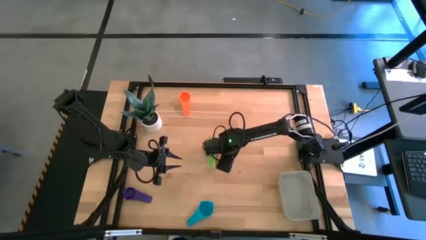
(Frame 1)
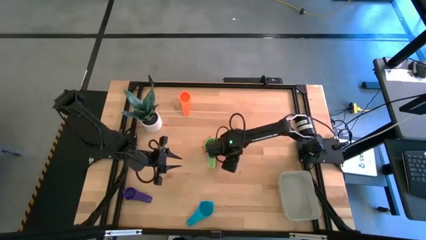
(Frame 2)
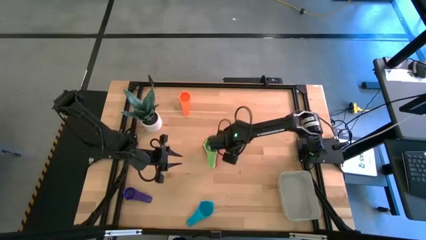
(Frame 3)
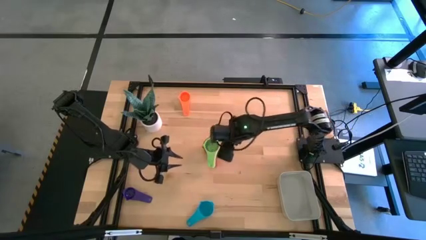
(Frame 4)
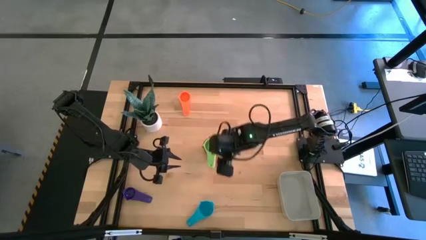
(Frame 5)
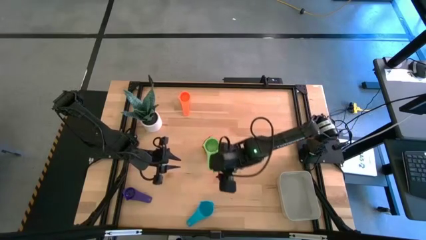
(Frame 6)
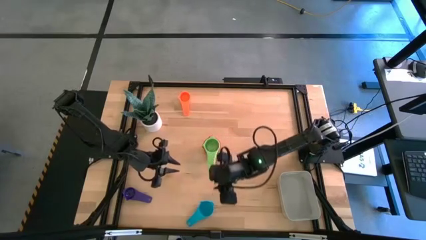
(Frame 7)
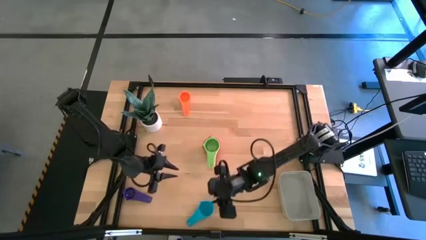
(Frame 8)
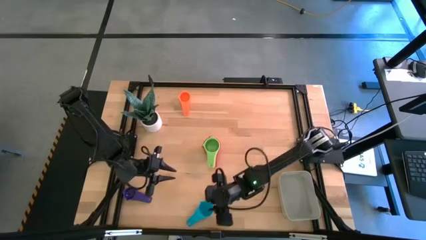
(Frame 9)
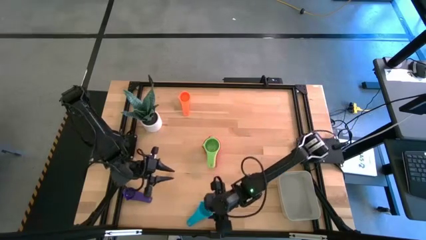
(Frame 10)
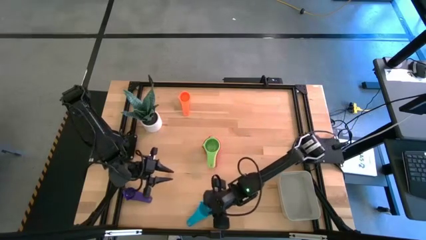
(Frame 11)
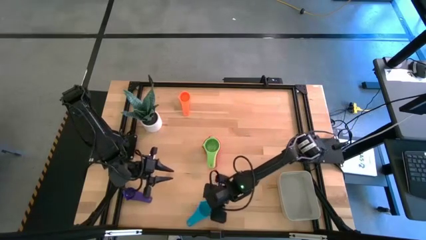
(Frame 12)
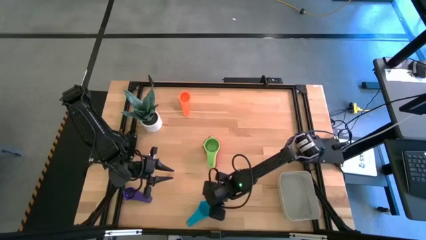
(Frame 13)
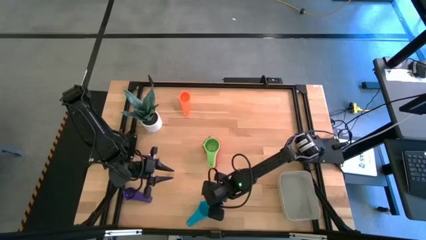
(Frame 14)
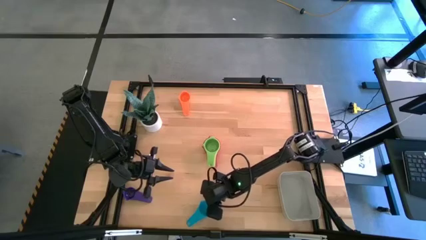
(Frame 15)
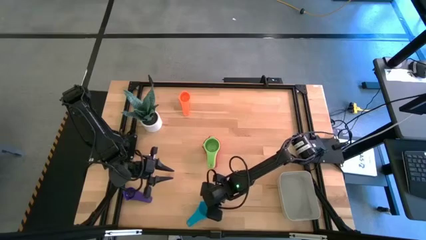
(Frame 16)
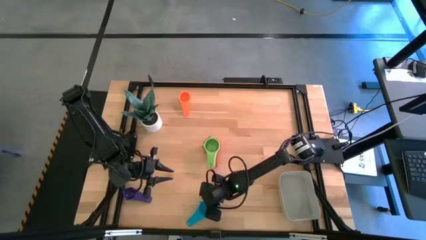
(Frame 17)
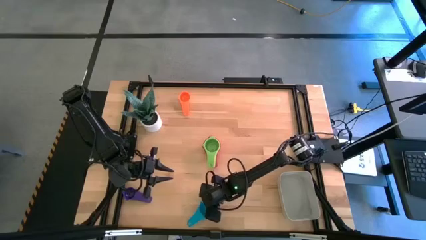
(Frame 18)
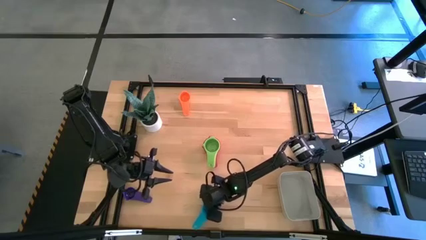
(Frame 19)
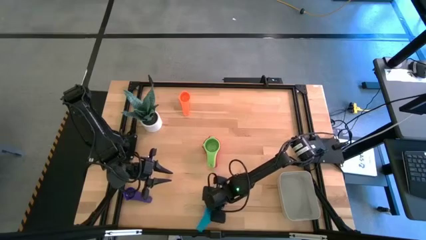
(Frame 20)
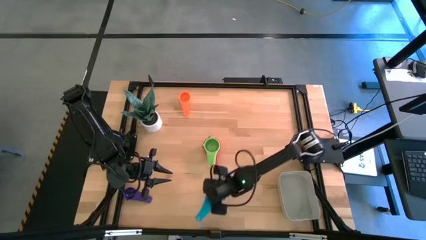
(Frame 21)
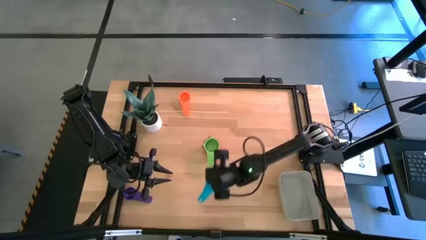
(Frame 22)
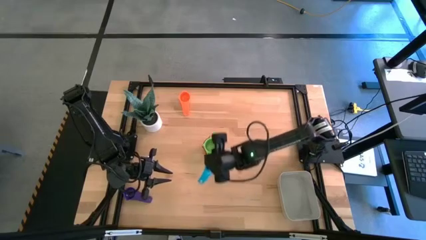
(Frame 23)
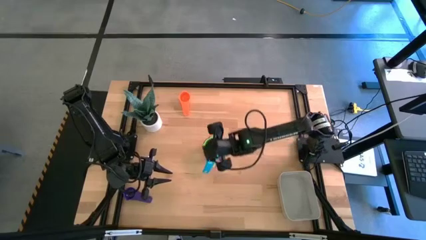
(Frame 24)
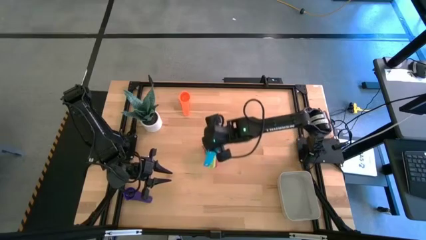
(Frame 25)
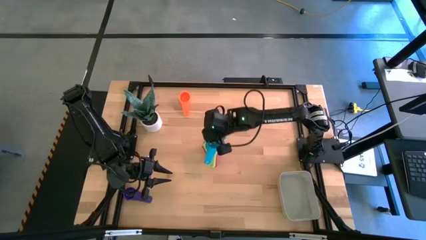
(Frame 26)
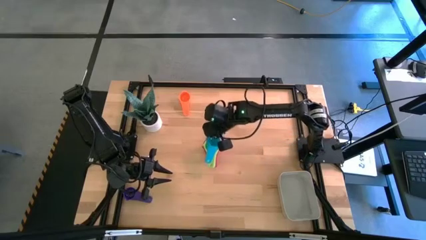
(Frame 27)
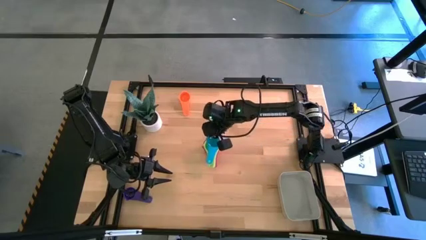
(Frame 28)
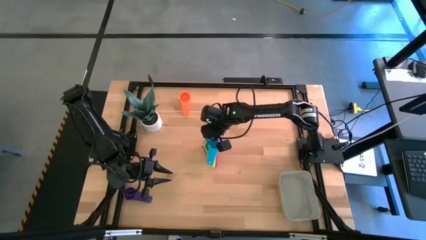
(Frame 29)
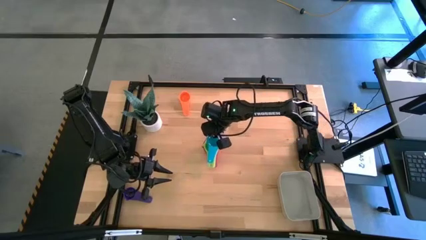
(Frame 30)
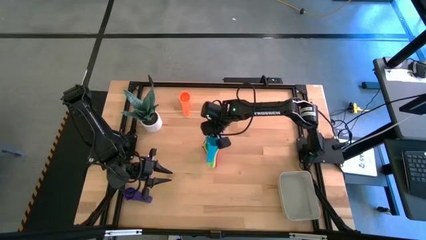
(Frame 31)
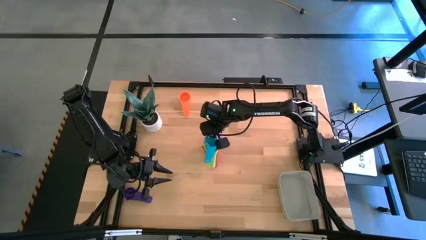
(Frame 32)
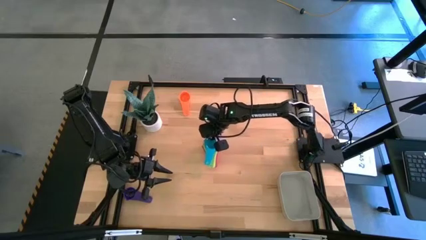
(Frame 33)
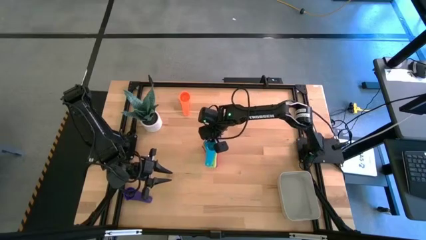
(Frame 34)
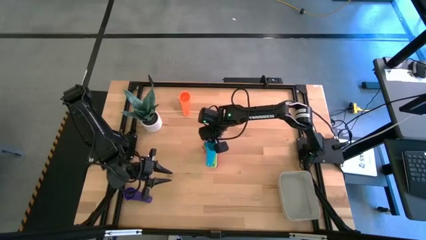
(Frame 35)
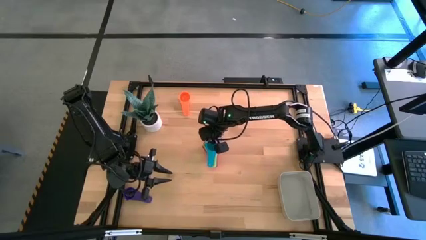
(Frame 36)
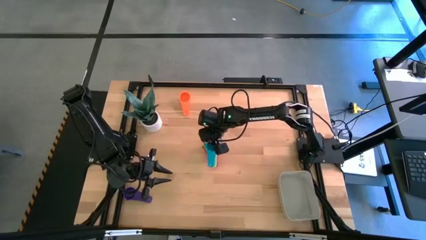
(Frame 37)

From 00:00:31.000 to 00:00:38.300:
Task: Nest measuring cups in basket
Stack the light blue measuring cup on top of the green measuring cup

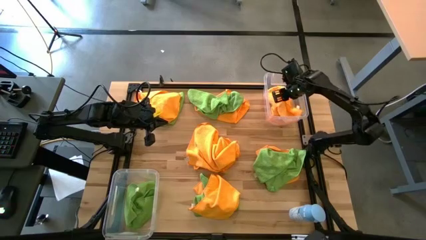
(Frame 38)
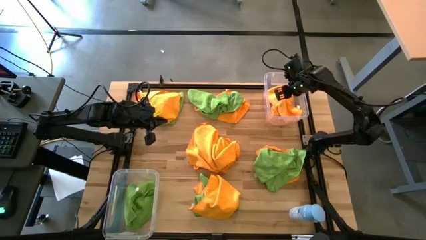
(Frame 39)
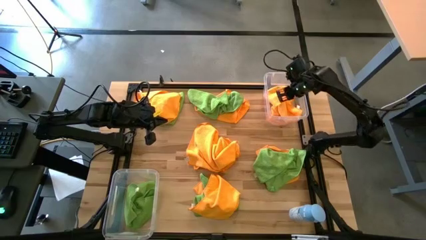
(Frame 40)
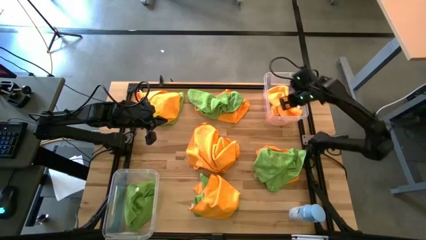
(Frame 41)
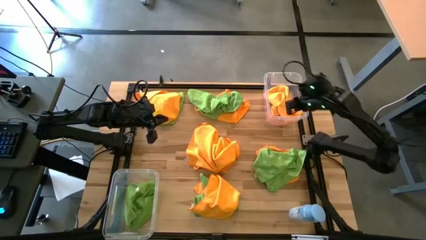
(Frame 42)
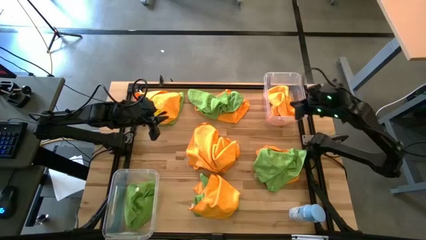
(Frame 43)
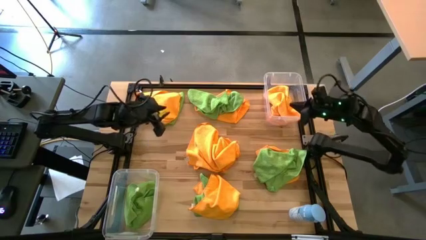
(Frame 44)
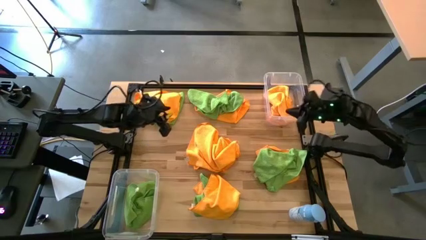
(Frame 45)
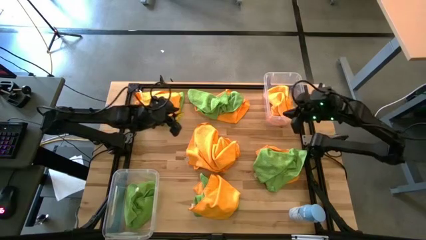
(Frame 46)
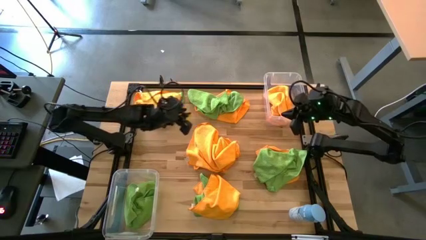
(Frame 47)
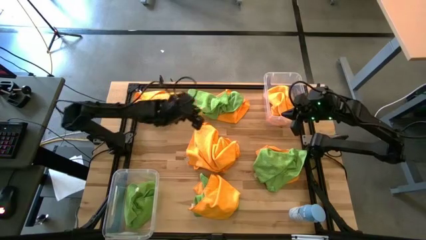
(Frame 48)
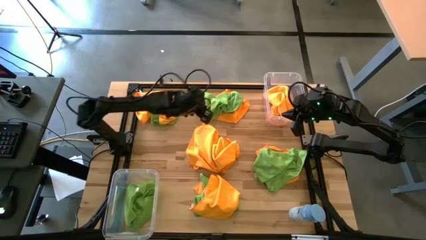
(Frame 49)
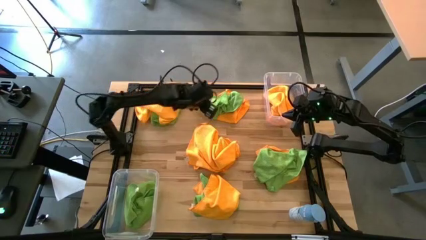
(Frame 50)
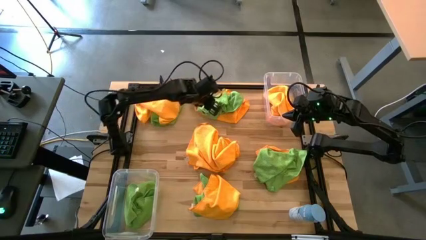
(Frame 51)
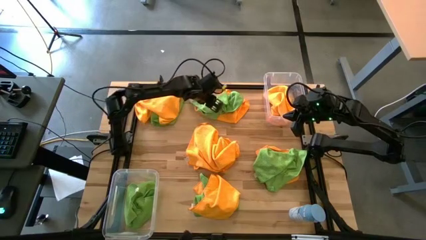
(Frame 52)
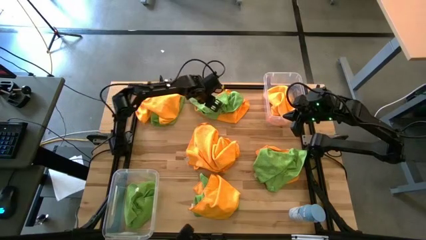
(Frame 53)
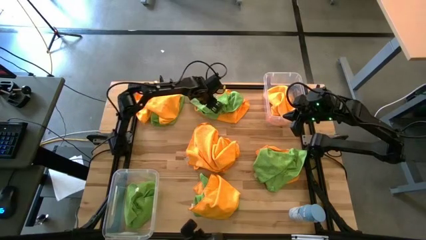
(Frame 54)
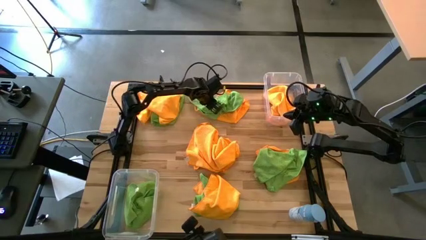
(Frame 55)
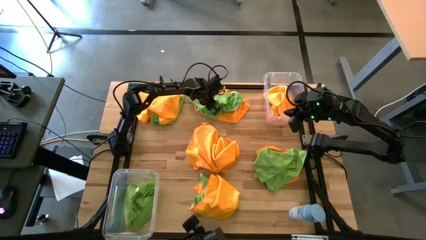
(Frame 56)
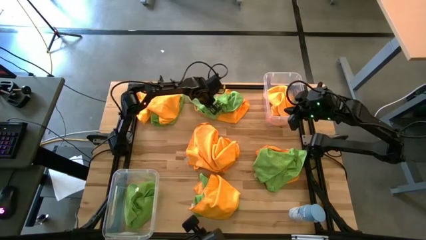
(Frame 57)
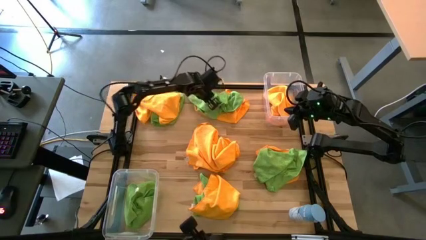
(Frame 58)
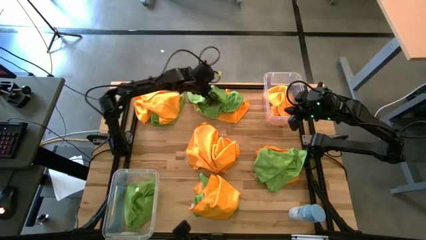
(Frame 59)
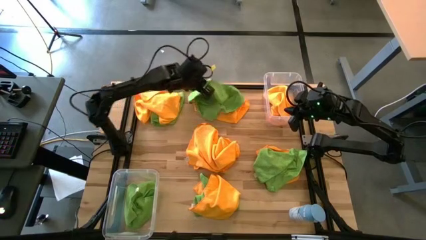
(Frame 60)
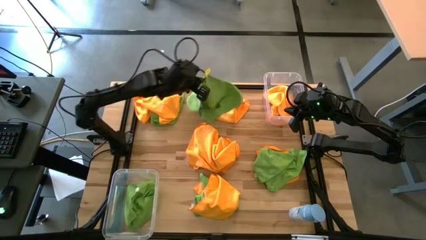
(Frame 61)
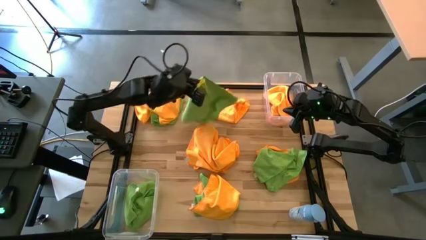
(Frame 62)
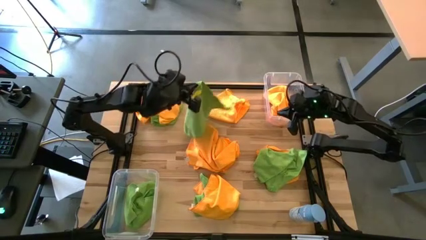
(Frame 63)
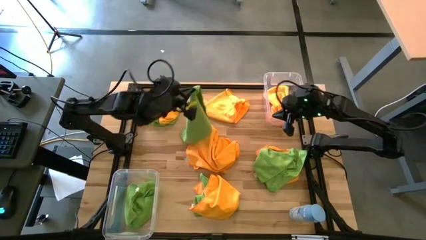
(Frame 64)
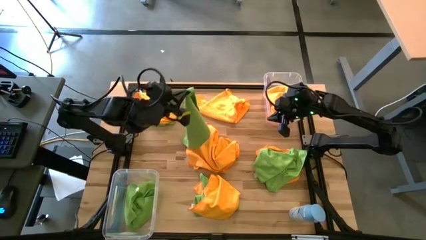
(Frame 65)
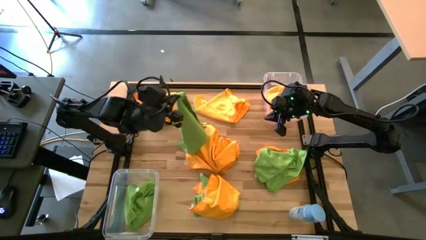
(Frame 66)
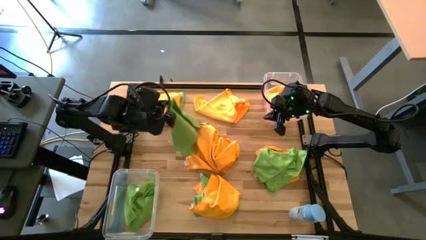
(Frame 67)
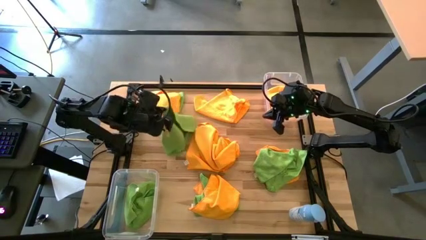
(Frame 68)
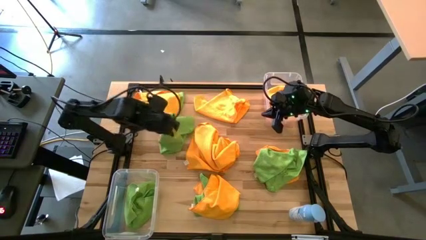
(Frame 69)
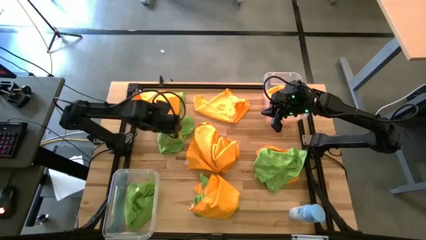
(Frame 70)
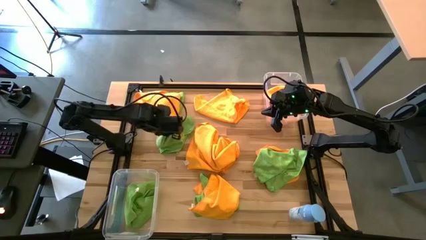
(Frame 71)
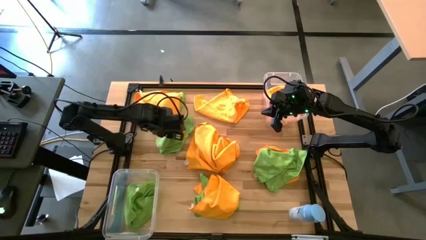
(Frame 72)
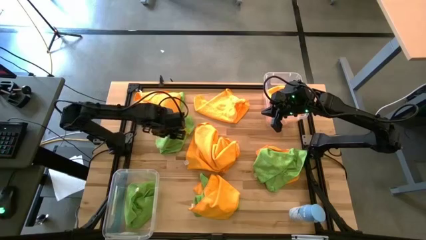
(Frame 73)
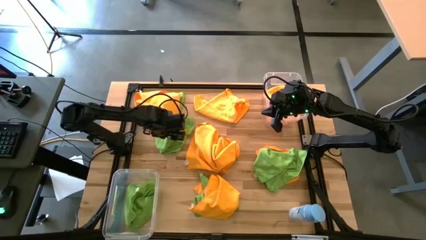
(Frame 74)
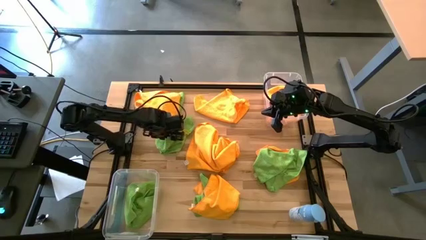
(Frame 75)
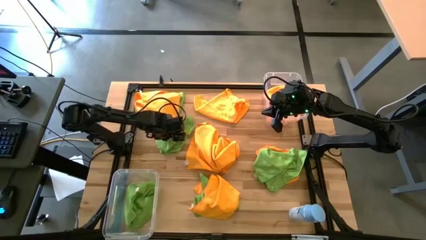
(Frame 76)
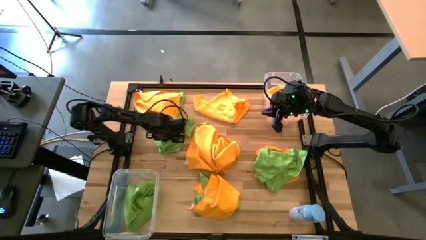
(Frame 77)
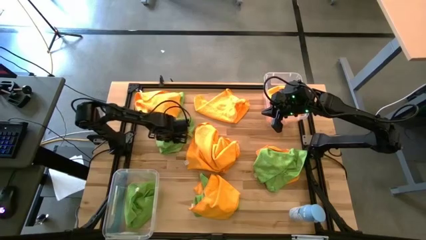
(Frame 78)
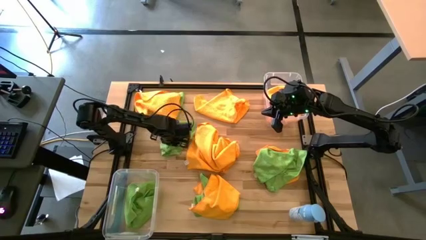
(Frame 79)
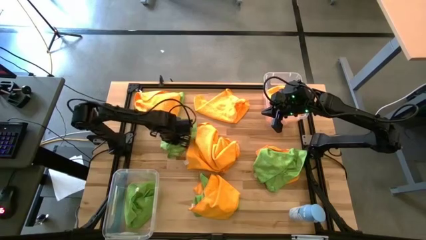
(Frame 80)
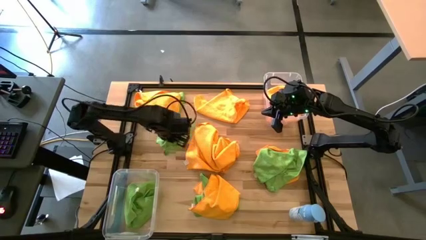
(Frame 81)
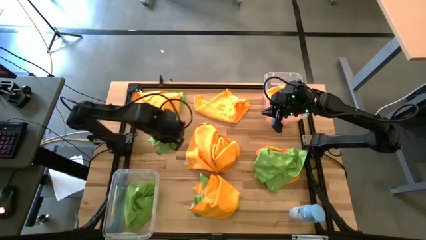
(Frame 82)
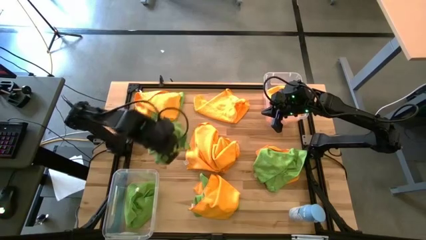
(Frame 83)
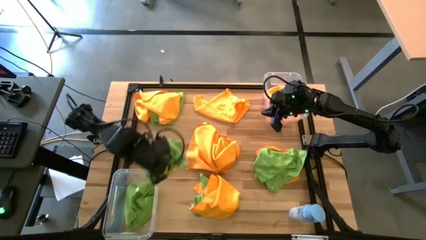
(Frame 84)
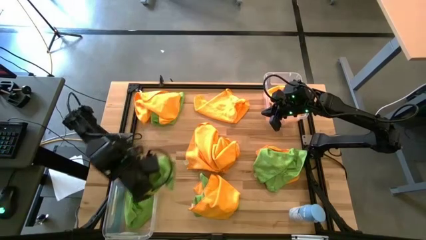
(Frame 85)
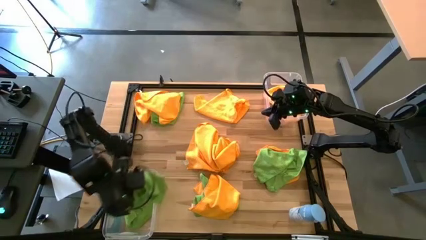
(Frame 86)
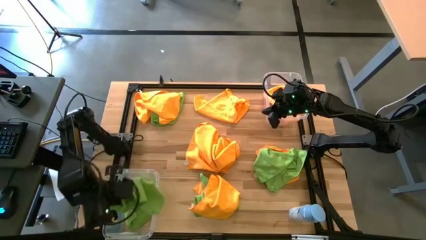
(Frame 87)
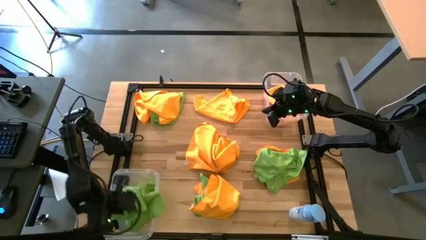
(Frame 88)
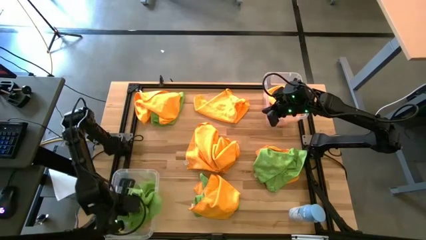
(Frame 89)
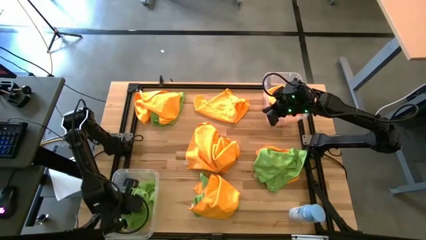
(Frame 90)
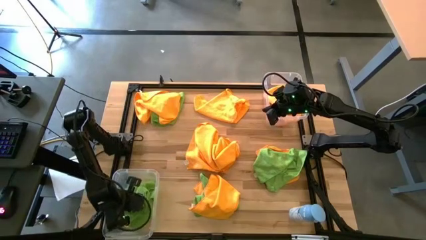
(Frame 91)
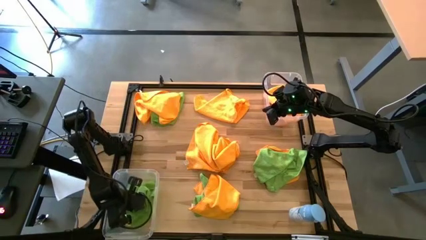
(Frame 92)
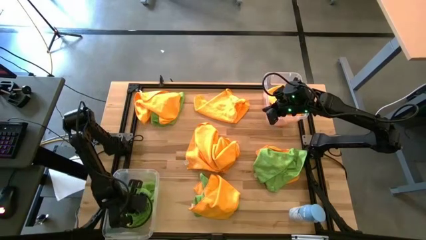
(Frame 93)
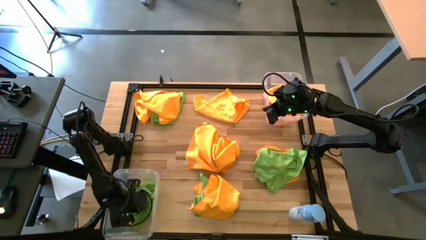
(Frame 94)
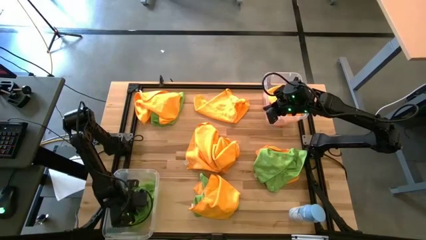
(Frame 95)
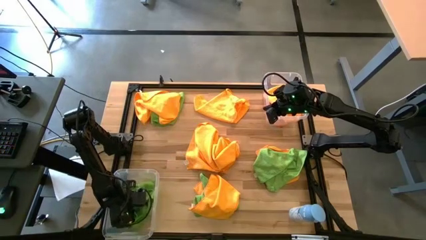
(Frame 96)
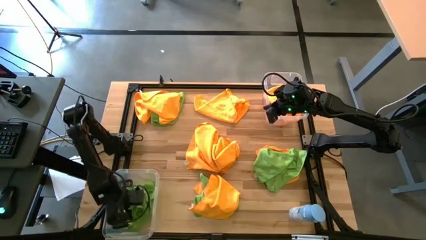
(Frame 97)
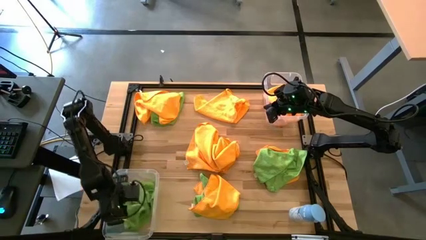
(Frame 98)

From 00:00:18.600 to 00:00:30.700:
Task: Sort microfiber towel by color & place in baskets
Put the green microfiber towel into the bottom transparent bin
